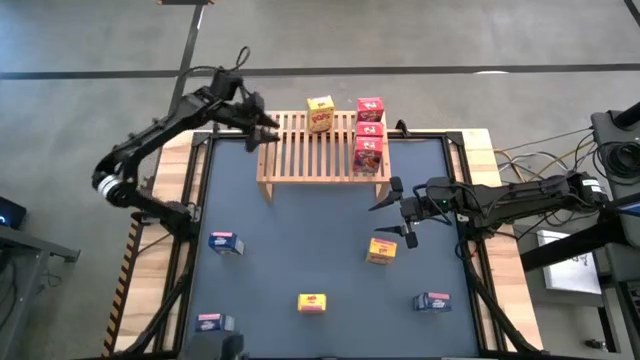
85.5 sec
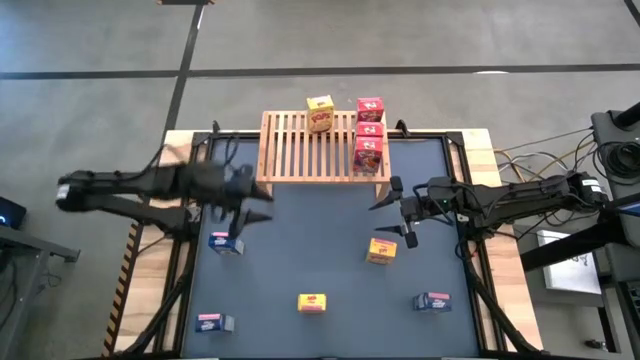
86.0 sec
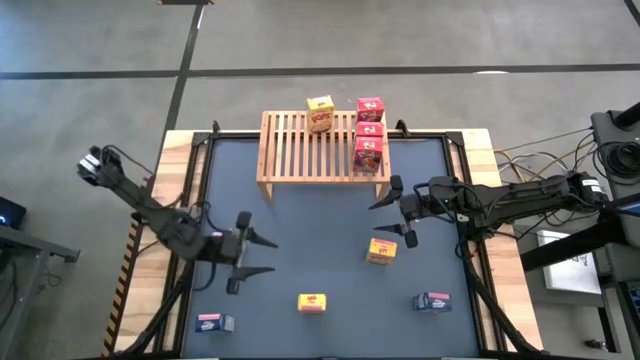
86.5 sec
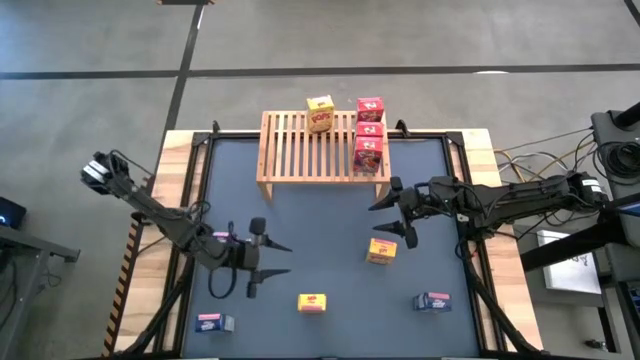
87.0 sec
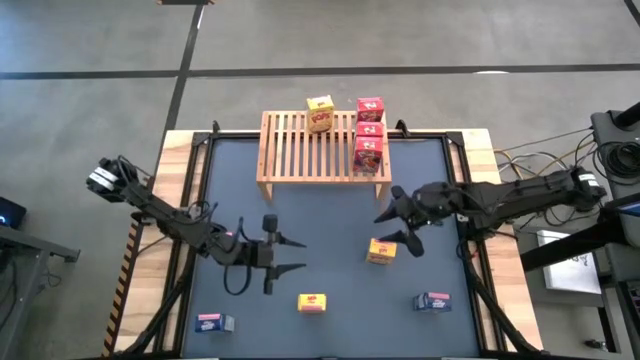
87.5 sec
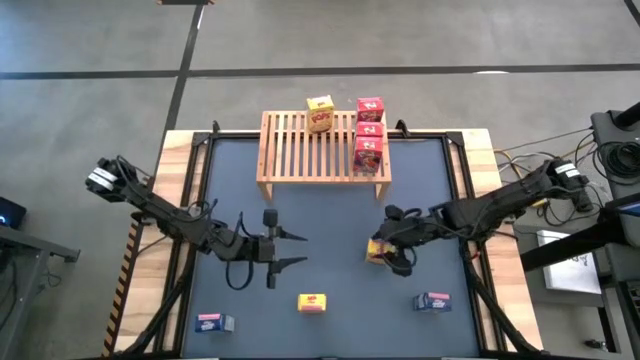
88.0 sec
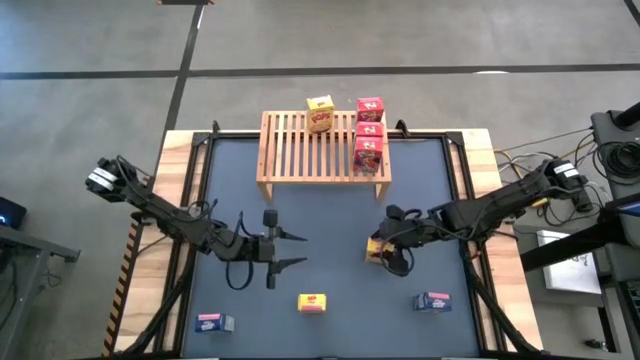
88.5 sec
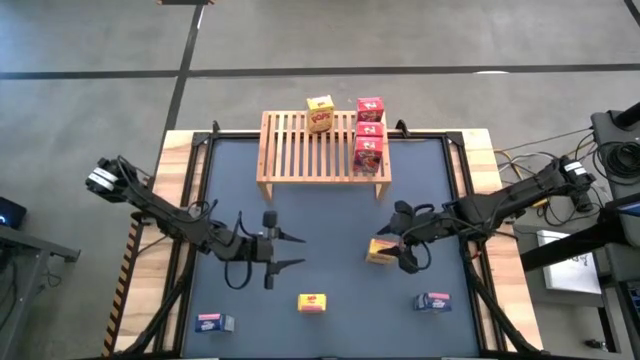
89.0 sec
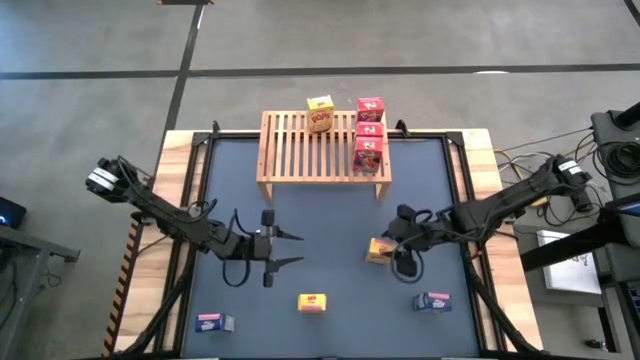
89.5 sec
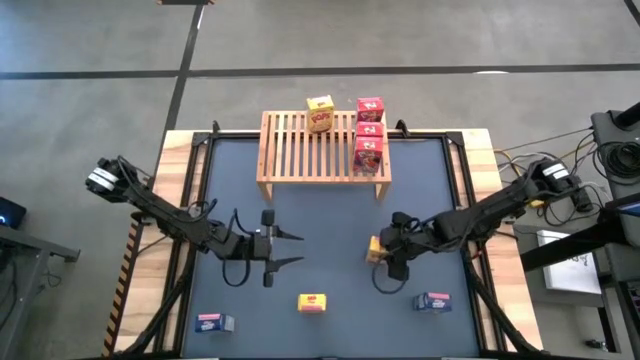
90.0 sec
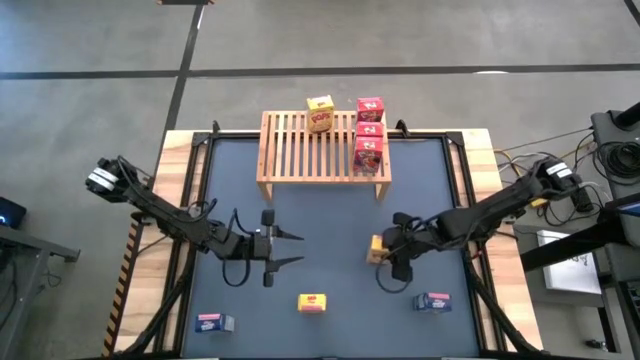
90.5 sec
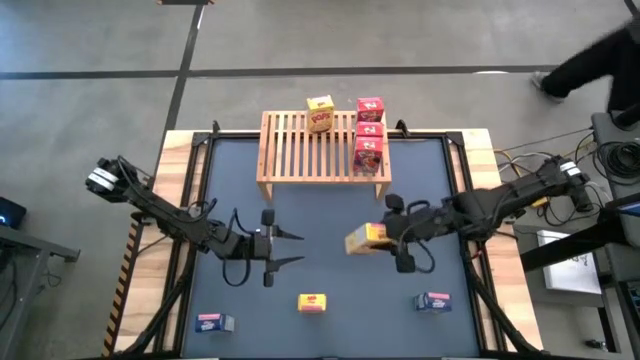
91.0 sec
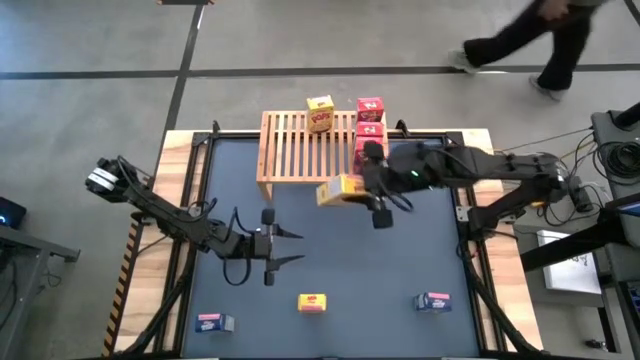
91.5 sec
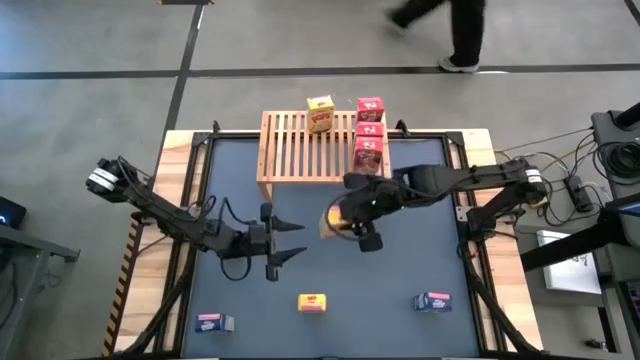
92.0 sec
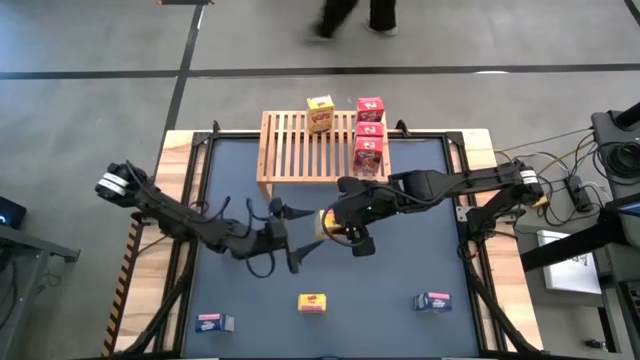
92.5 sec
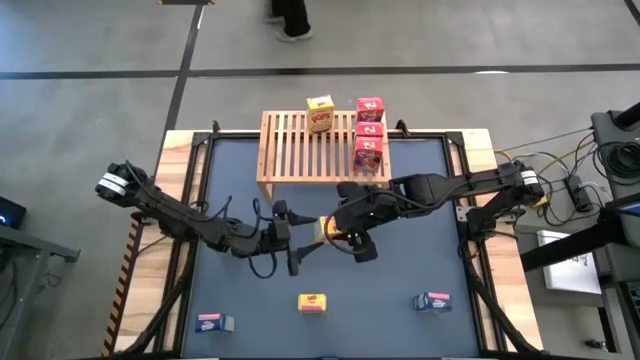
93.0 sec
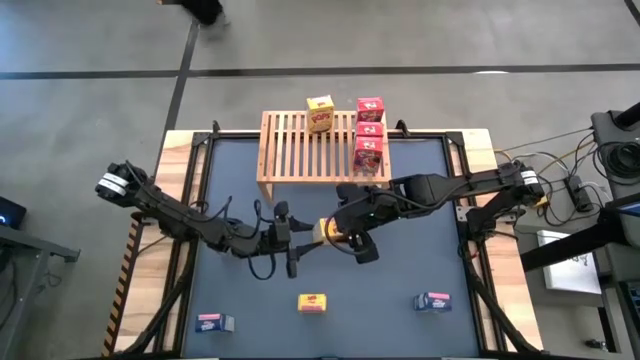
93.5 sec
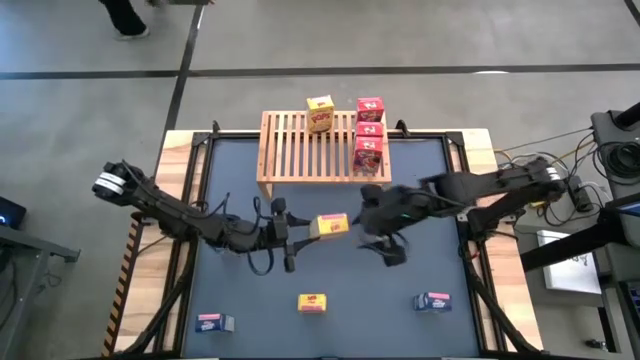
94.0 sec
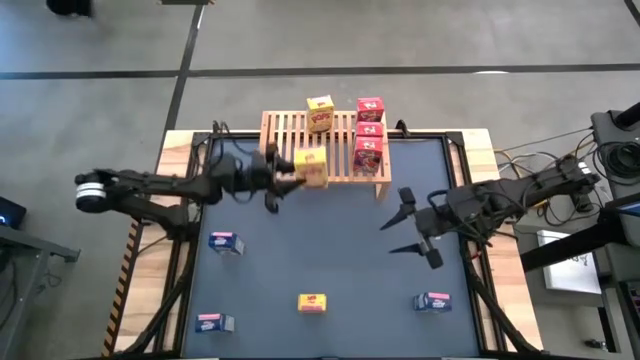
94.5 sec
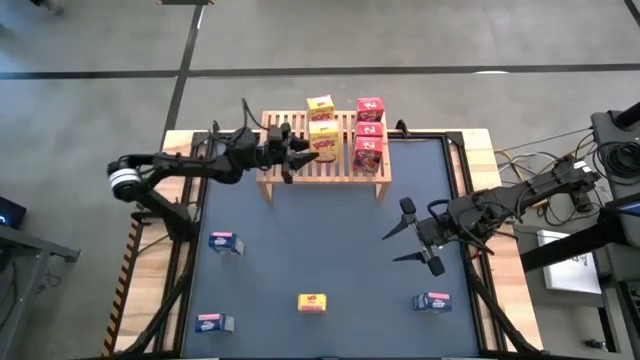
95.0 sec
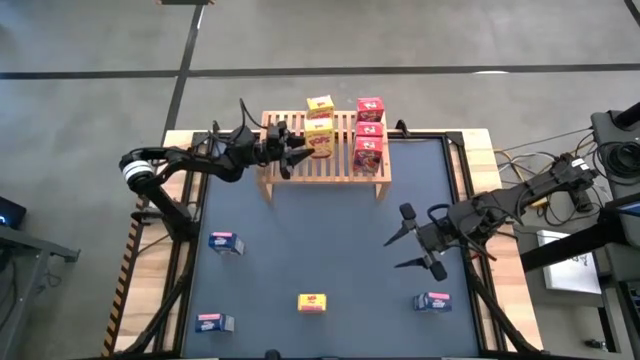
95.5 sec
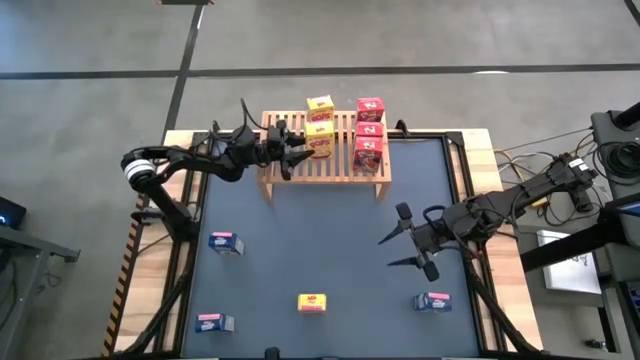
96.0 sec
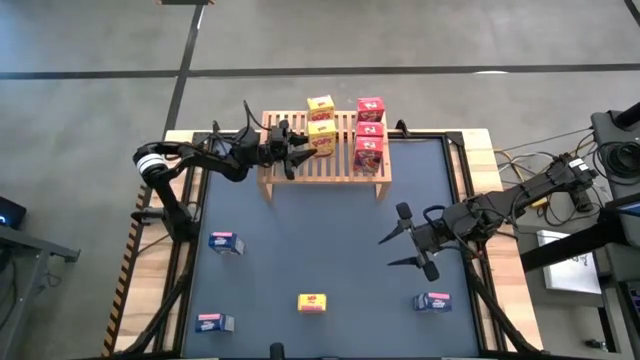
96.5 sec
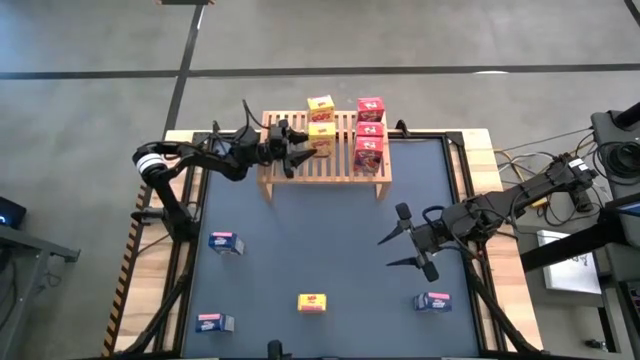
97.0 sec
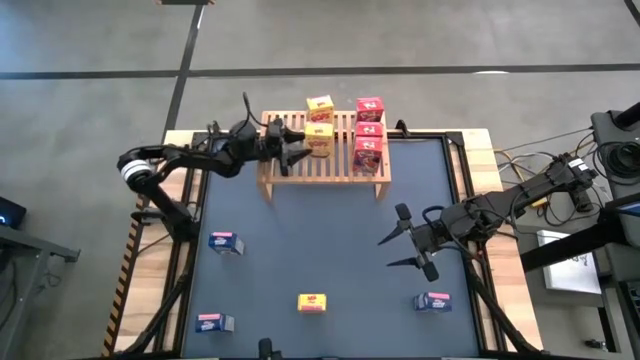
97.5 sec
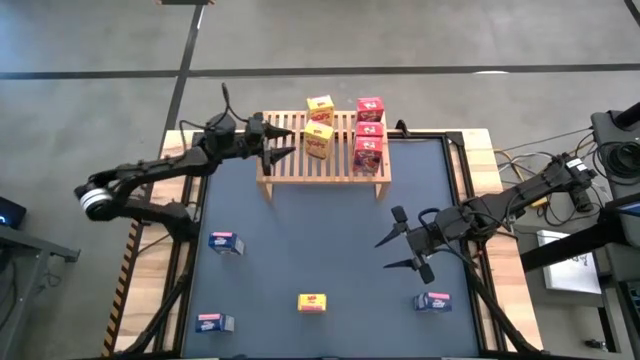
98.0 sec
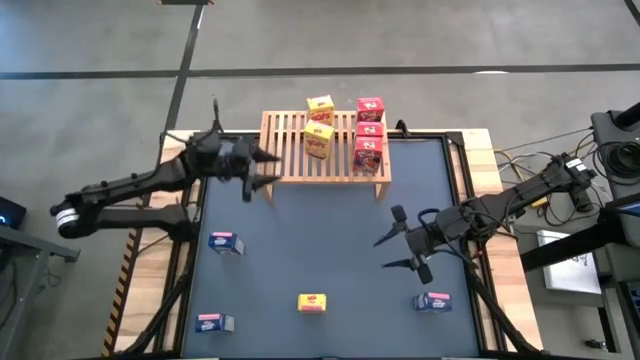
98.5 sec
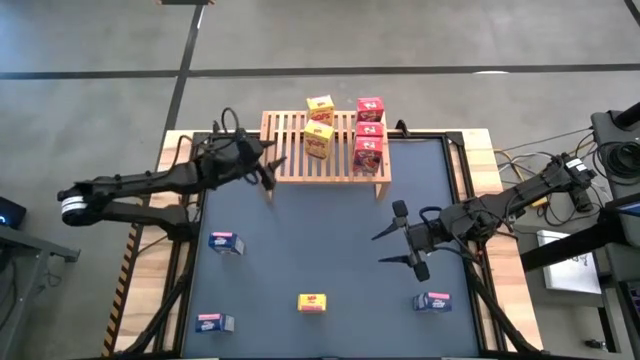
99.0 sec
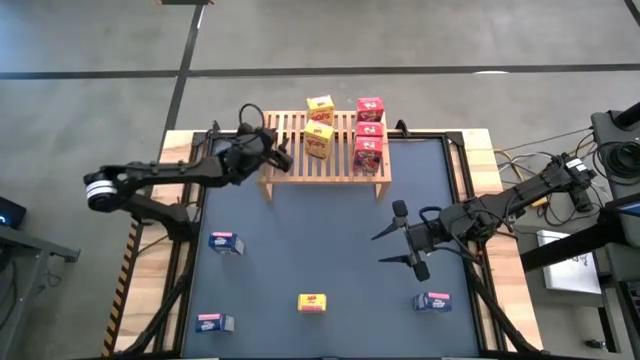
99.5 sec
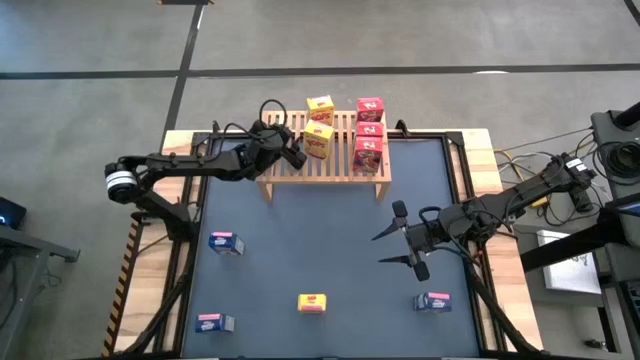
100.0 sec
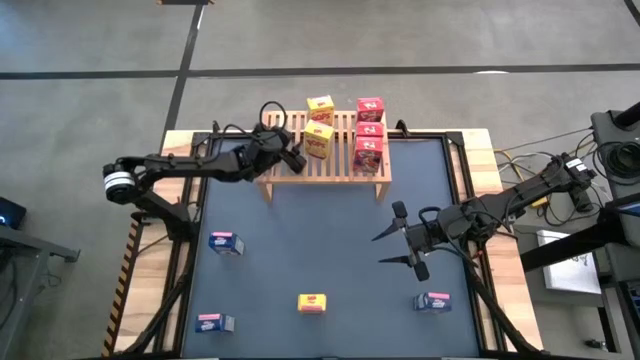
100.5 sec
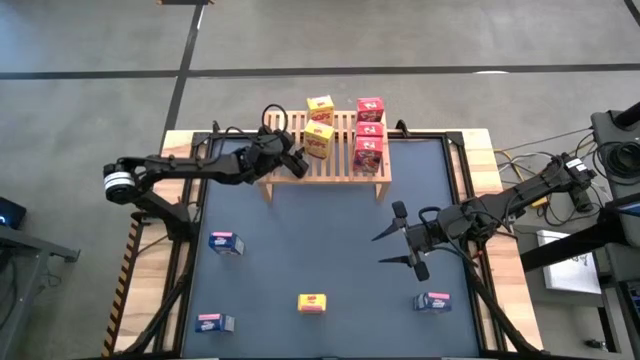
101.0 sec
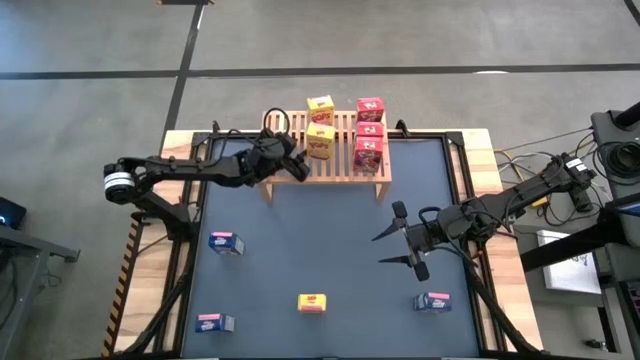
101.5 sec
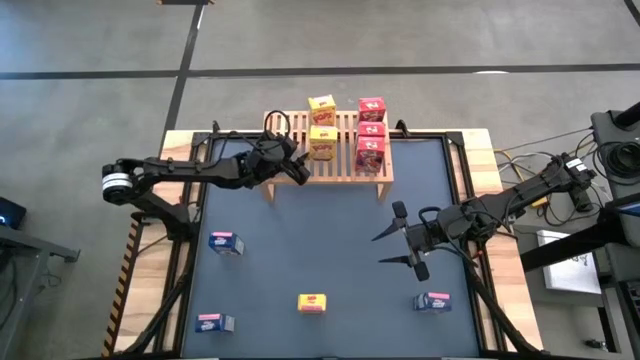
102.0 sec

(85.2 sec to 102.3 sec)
Task: Stack cereal on shelf
Put the top yellow cereal box on the shelf aligned with the yellow cereal box

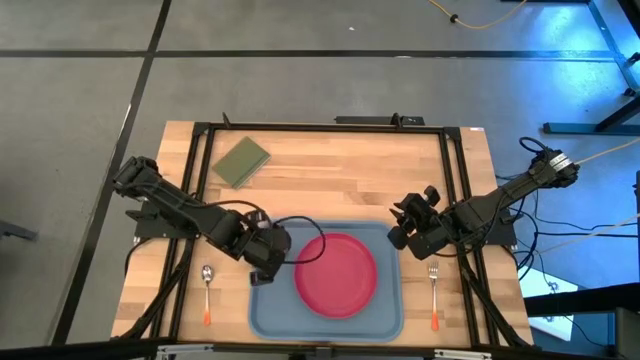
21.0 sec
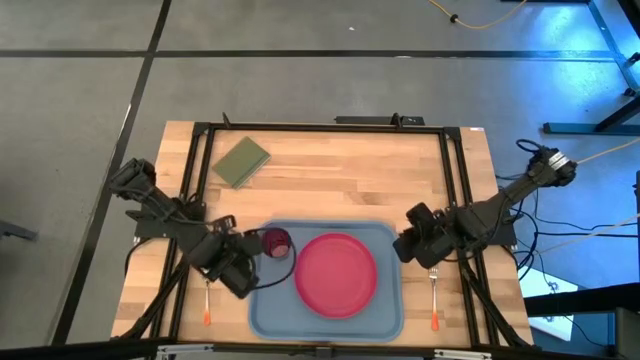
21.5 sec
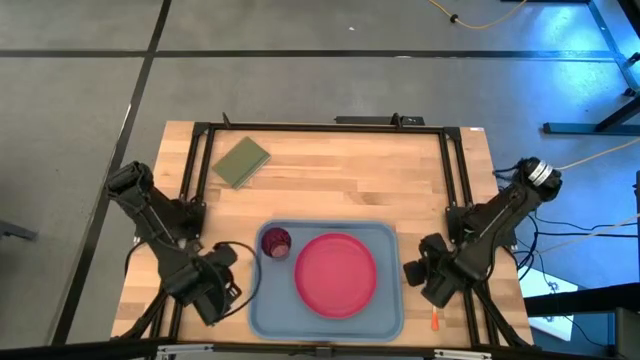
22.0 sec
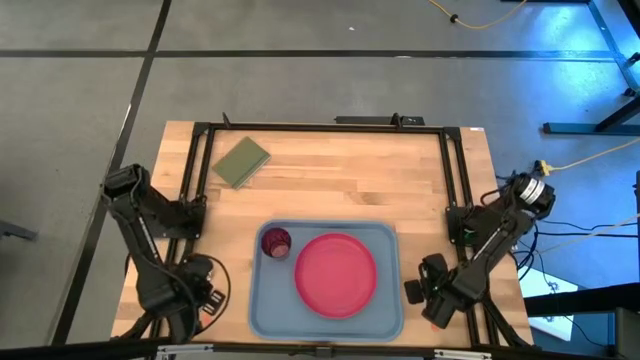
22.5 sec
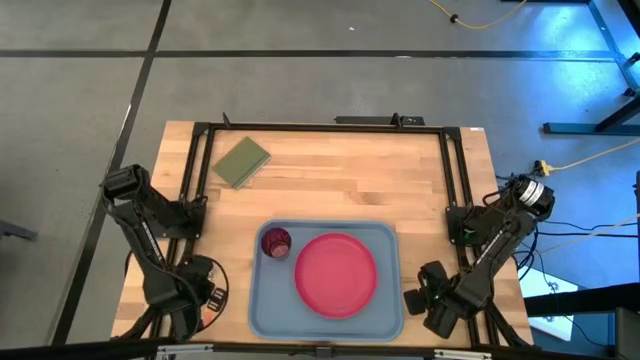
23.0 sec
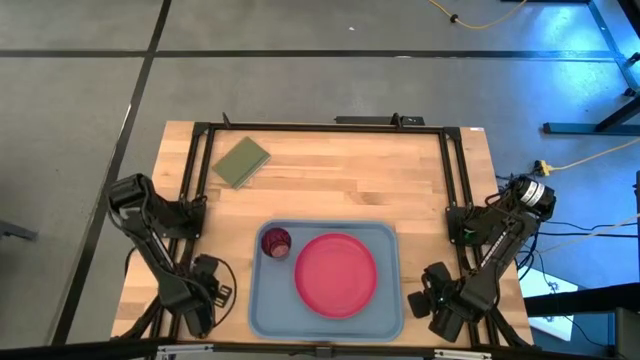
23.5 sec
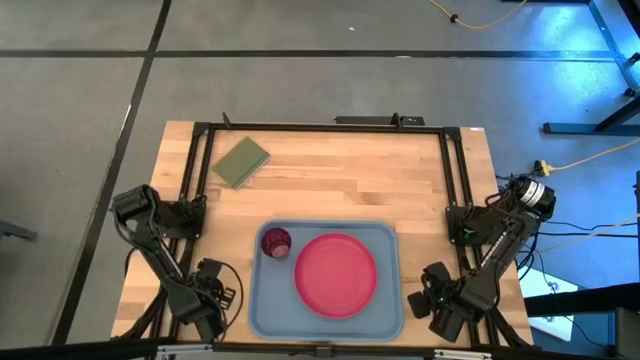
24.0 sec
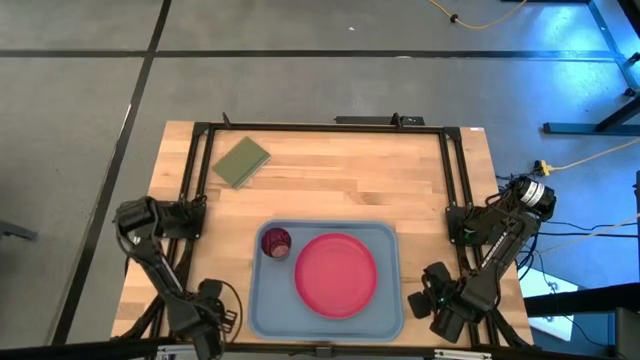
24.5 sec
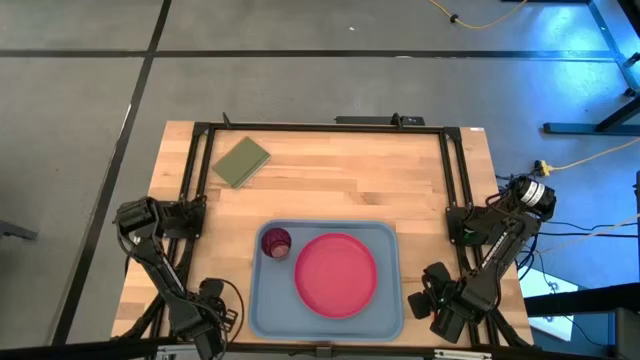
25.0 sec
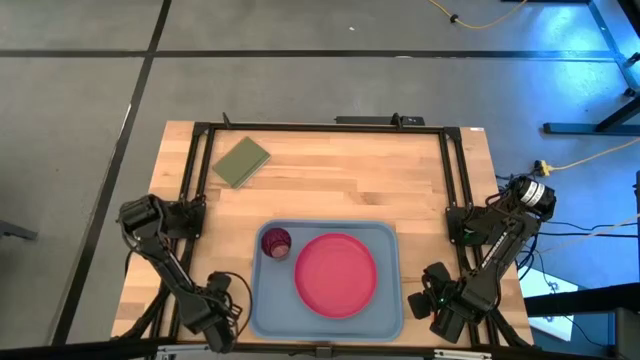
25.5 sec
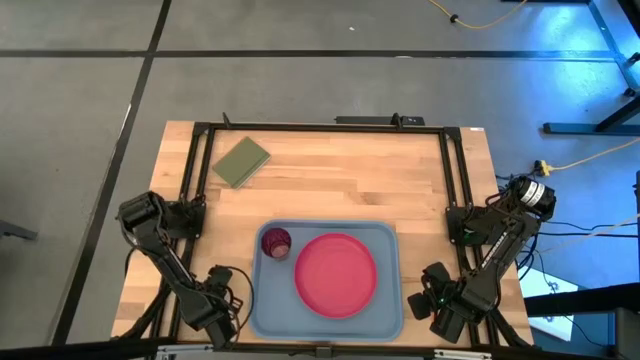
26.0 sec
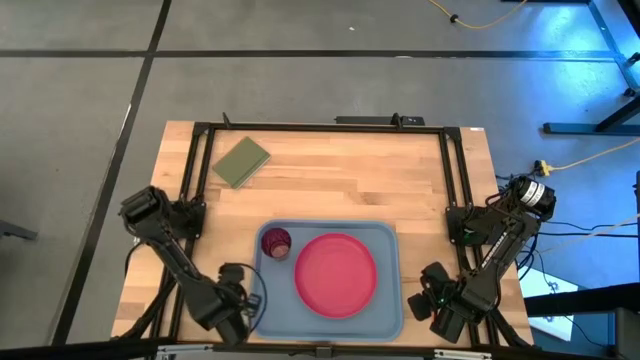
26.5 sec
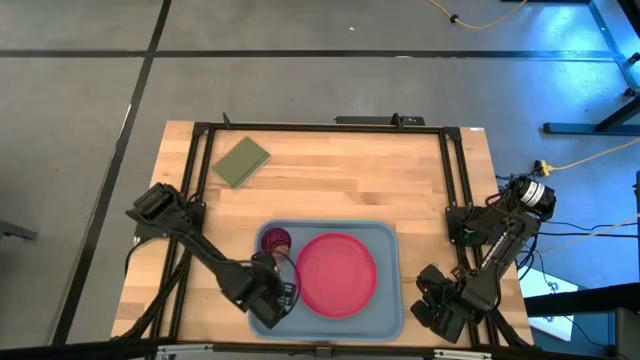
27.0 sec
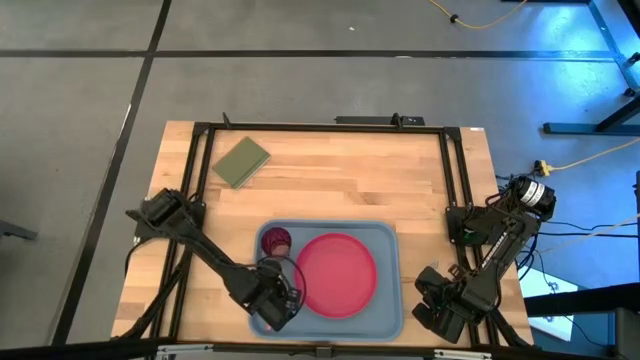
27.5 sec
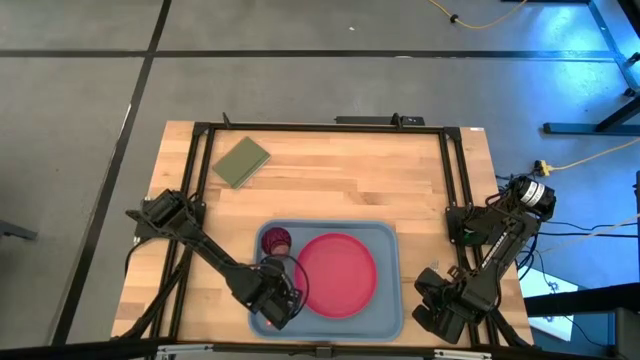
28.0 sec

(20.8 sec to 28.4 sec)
Task: Pick and place plate/cup/fork/spoon on tray
Put the orange spoon on the blue serving tray to the left of the red plate
